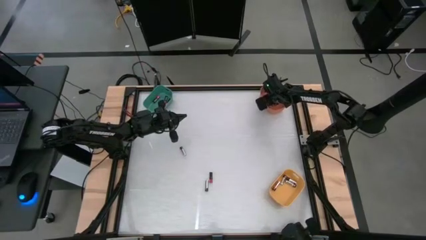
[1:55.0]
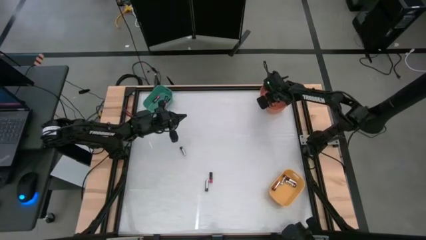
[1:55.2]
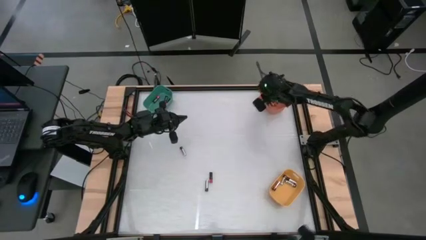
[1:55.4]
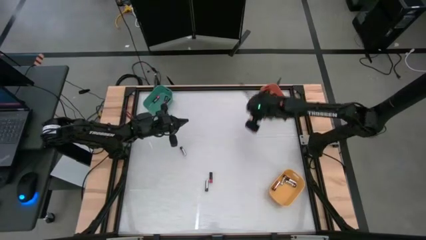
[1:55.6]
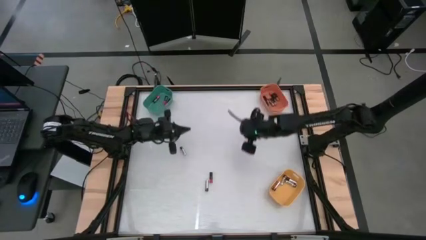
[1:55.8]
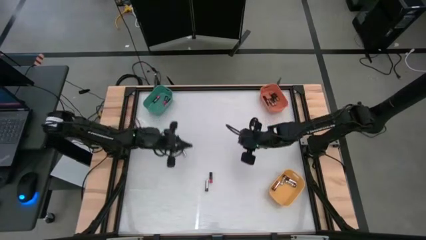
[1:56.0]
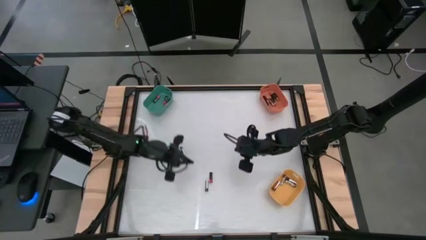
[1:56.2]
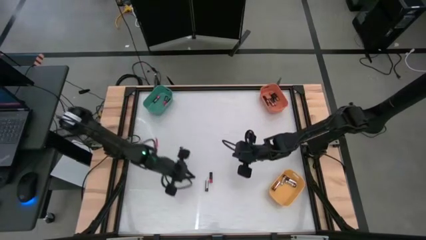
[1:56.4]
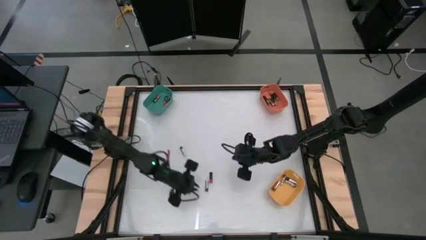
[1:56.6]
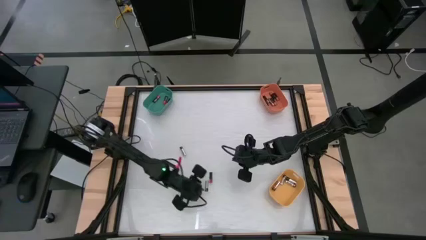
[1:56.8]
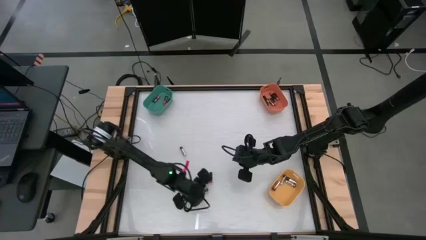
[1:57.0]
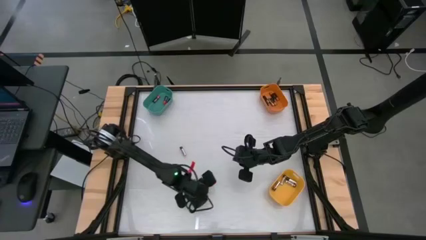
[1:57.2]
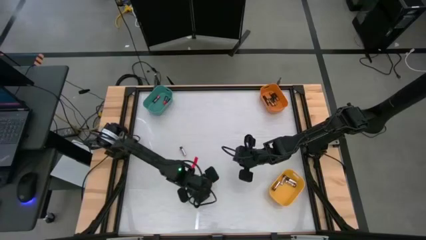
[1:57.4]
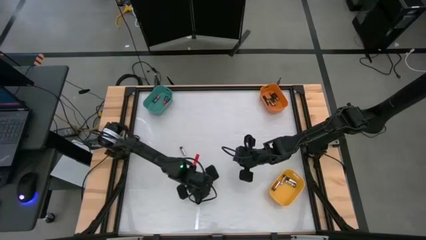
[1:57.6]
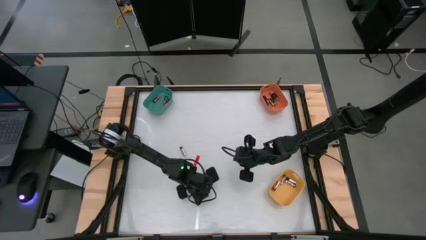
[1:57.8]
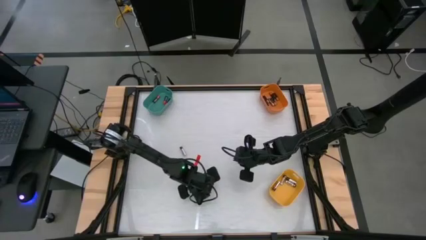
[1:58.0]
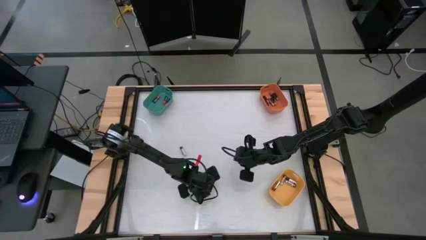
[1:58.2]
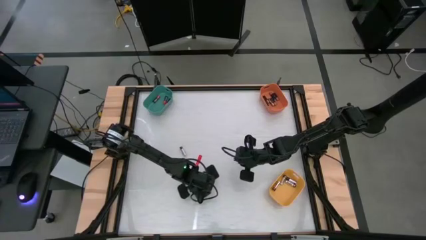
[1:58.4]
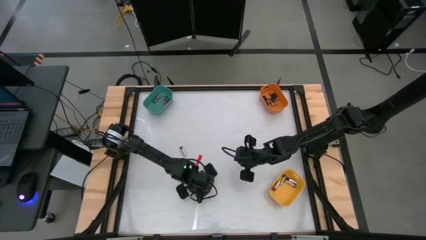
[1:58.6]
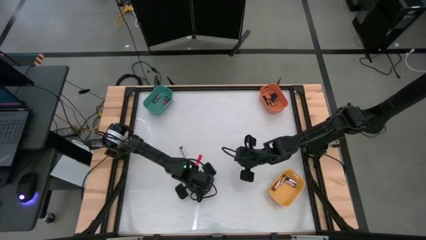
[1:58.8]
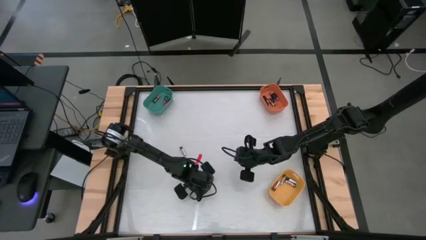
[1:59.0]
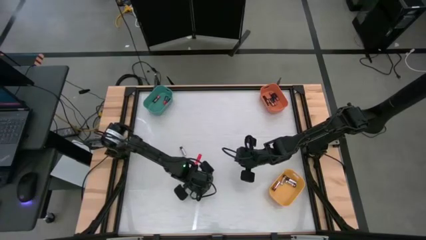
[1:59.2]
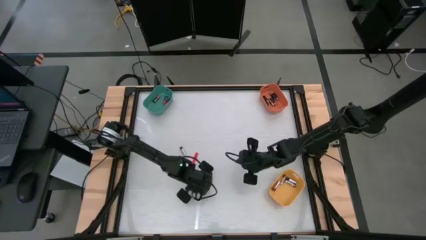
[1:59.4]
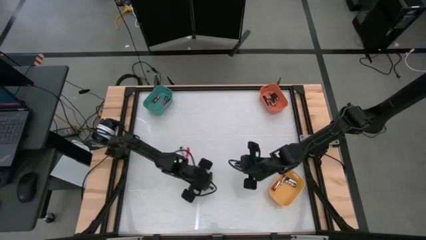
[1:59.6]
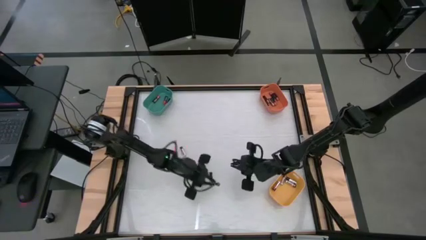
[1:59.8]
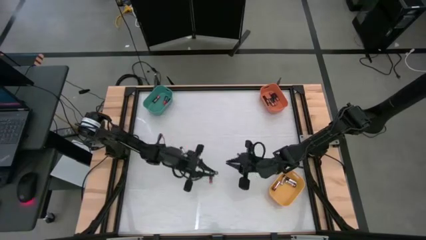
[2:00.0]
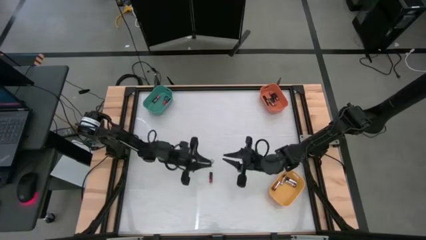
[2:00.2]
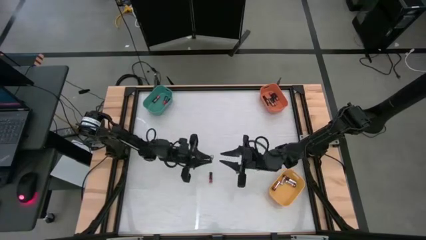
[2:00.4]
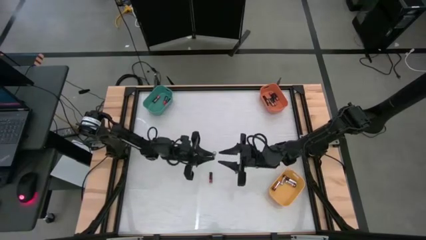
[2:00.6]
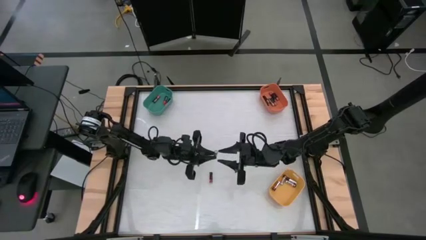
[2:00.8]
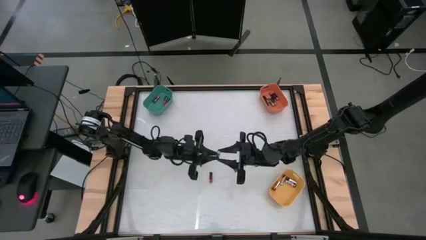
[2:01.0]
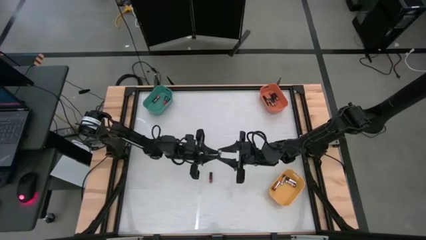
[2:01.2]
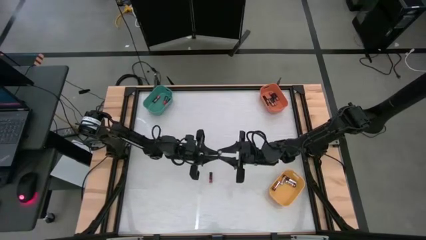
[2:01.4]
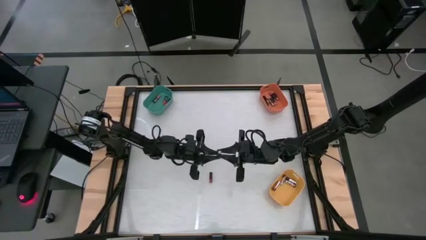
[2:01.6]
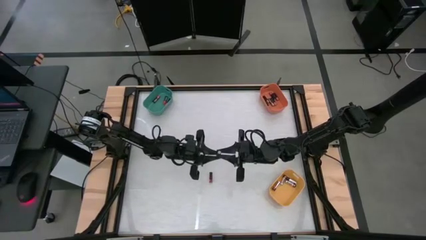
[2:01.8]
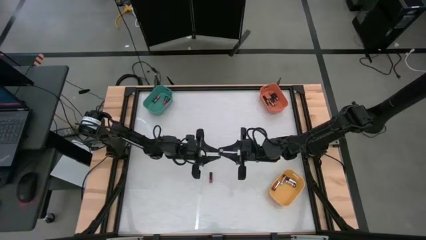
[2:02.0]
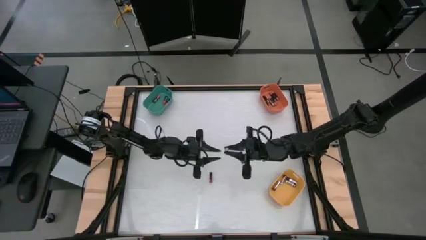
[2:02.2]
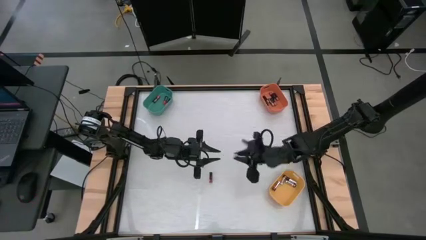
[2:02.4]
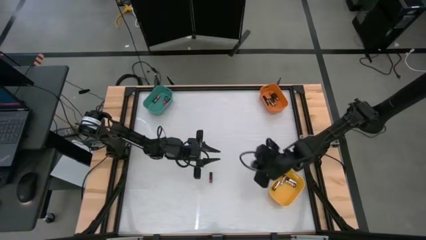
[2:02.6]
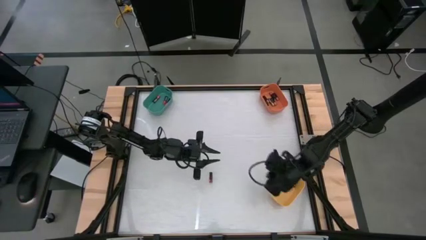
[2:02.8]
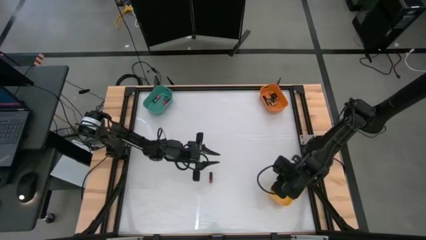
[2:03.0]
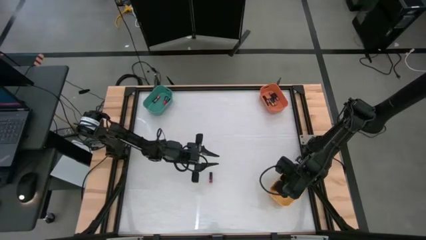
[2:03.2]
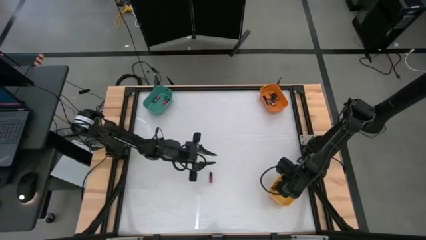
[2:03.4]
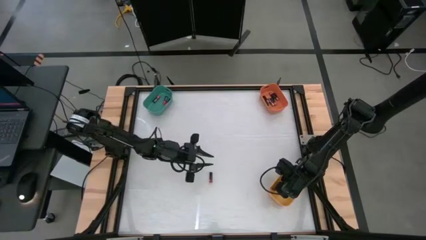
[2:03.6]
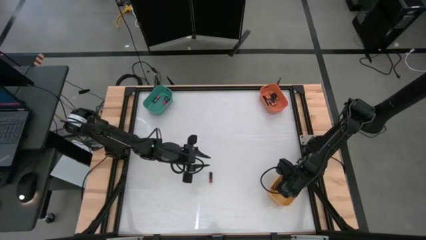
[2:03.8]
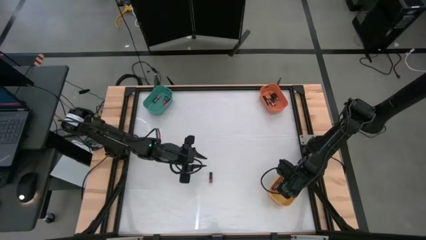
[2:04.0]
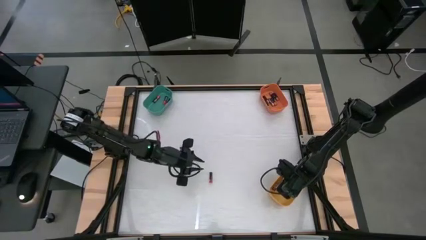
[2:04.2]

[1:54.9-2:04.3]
Task: Sort batteries
Put the silver battery into the yellow bin

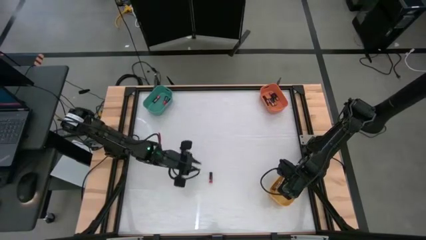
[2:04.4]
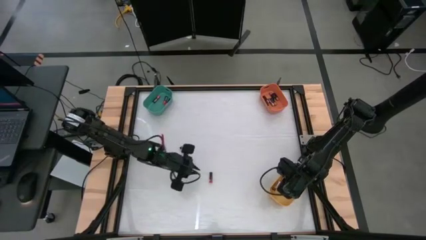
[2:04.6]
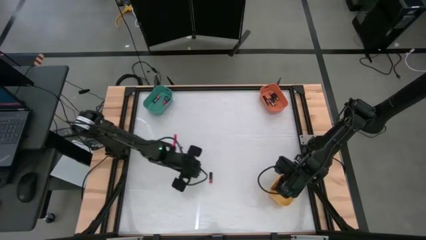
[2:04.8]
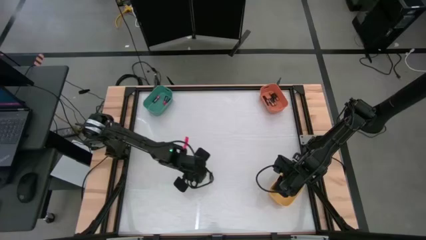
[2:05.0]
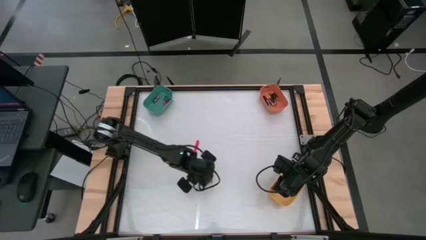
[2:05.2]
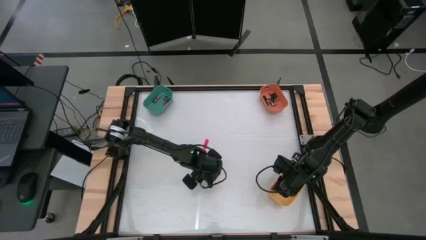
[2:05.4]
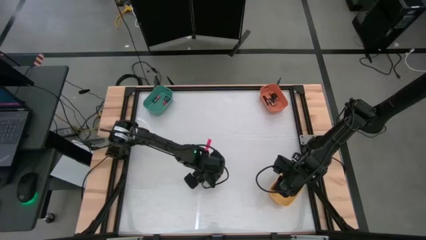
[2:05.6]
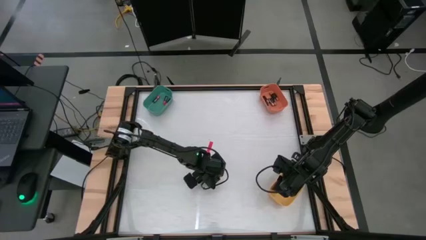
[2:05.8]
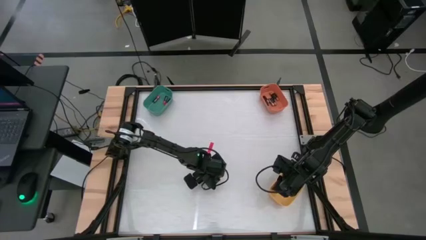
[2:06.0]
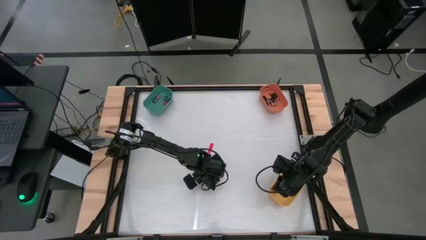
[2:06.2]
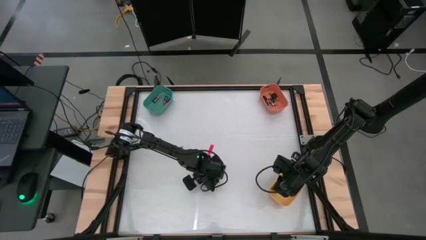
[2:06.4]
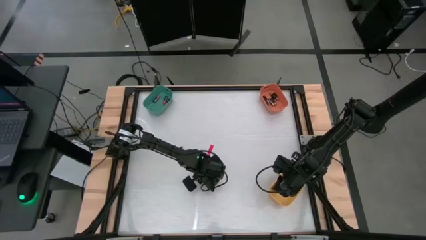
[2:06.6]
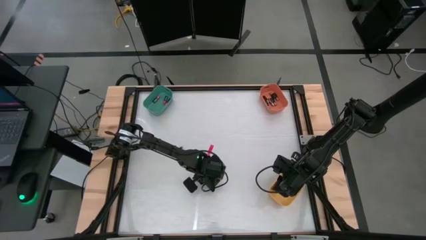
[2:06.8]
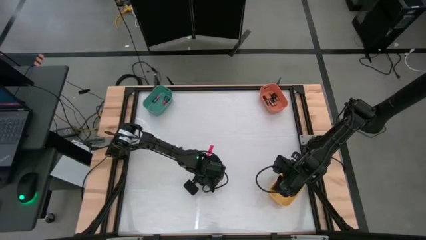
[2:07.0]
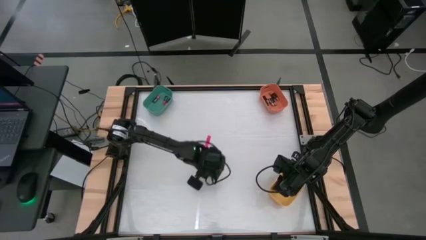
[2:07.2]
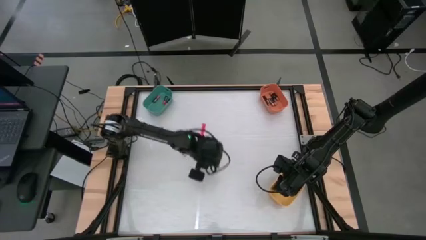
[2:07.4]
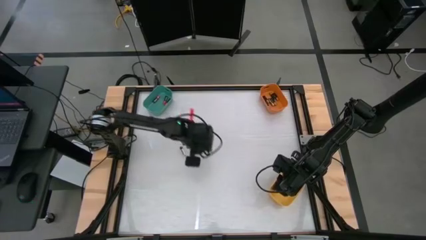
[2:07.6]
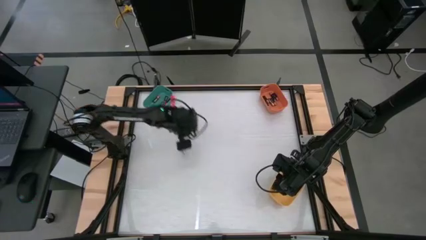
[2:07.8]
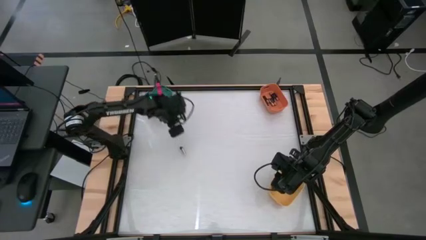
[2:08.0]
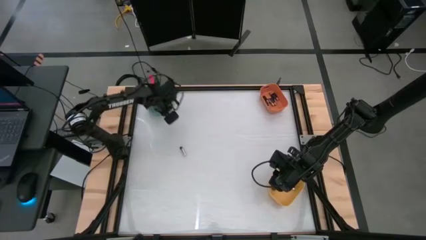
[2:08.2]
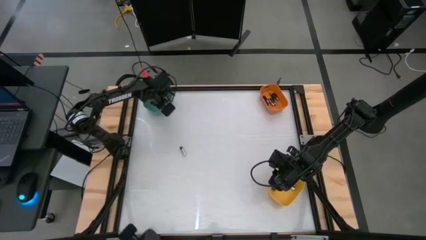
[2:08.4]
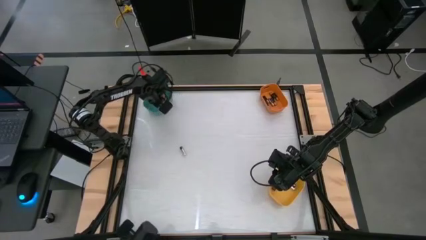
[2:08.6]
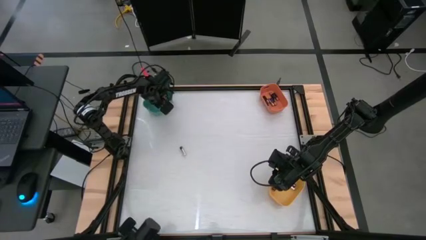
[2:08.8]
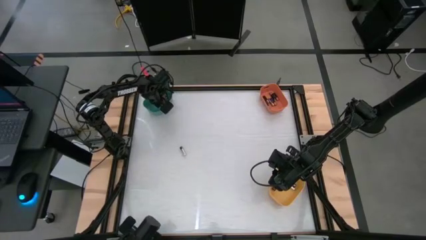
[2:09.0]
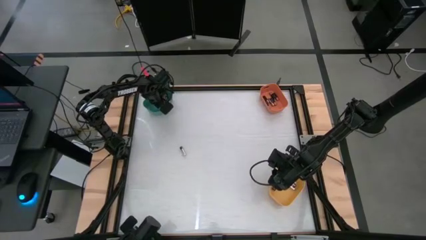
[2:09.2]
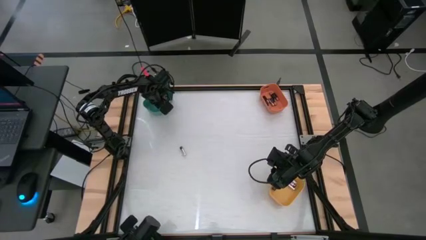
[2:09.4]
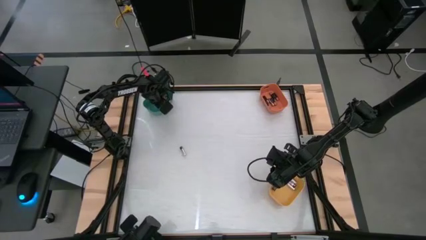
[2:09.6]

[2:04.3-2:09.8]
Put the red battery into the green bin

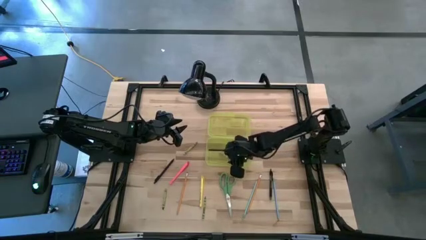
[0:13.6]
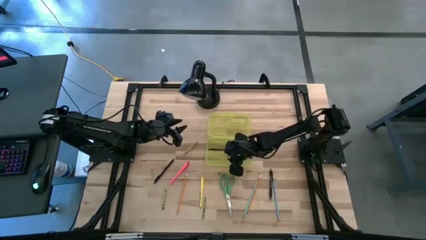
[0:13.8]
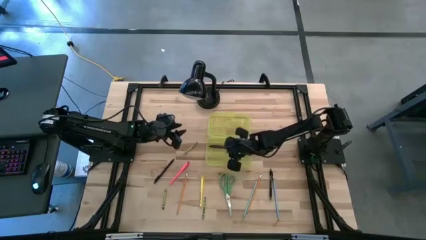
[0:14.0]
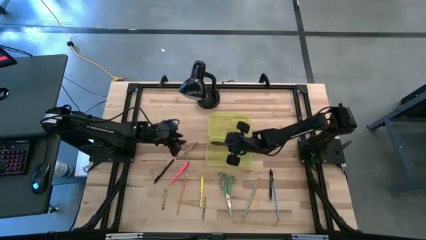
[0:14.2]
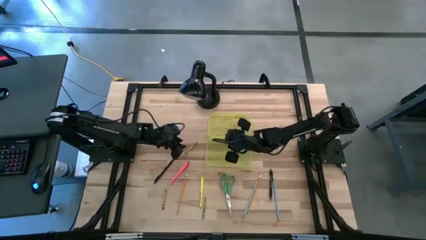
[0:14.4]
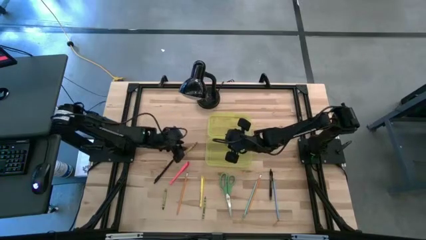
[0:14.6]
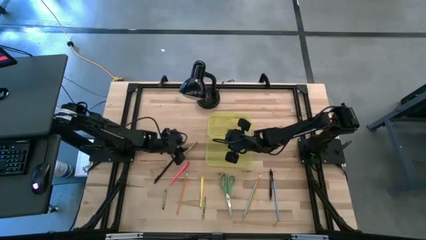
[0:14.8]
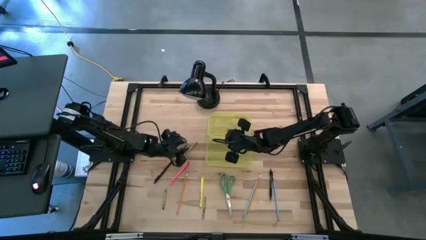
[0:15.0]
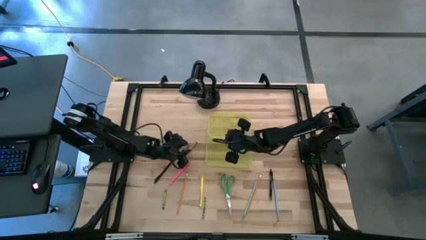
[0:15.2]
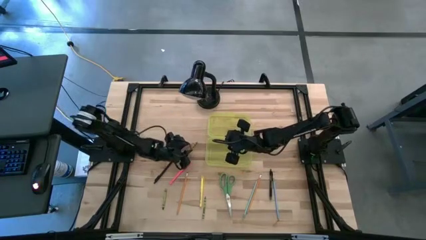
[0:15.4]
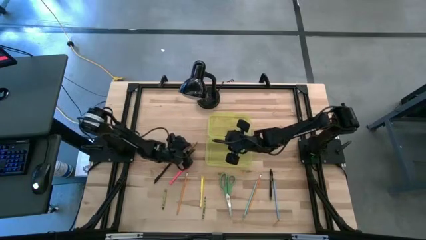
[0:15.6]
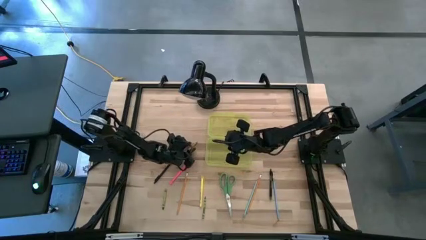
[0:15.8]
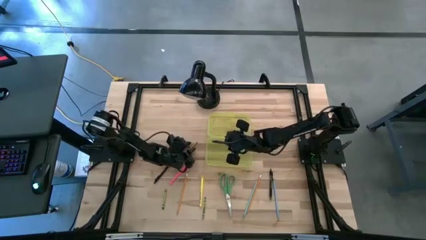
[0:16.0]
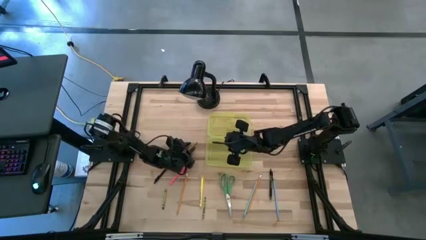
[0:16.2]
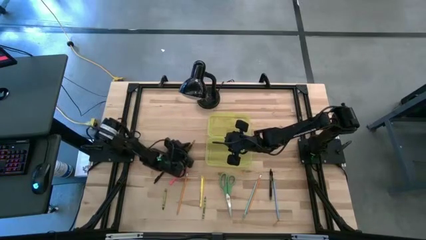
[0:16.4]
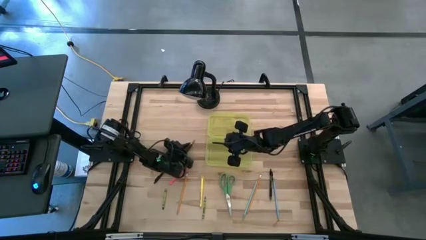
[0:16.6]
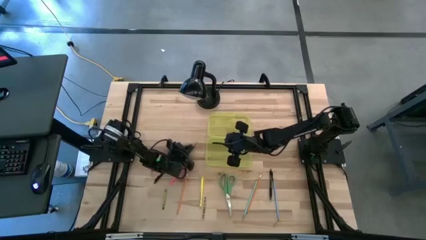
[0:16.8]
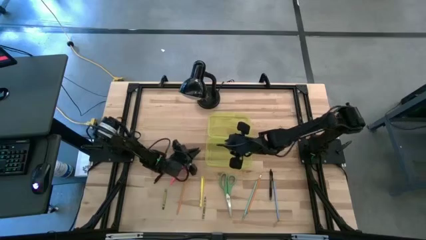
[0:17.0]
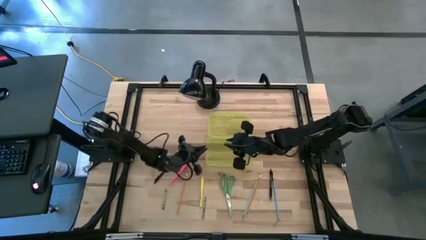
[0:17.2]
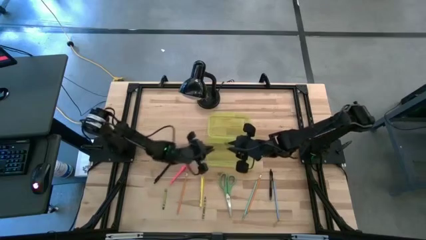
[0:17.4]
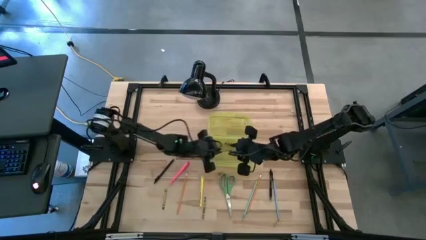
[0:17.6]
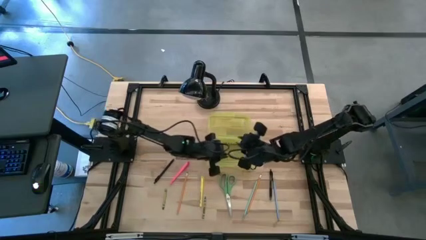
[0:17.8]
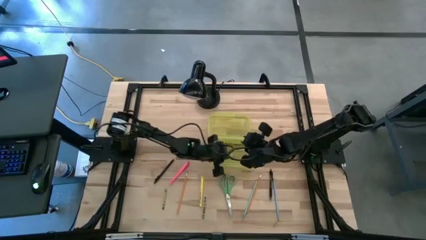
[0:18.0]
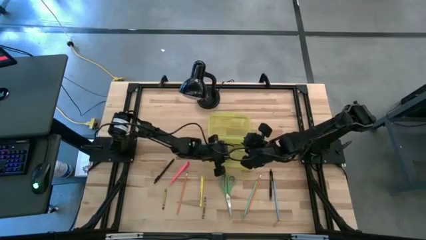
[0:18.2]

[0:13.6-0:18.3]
Task: Pick & place school supplies into a supply box
Put the top green crayon into the yellow supply box
